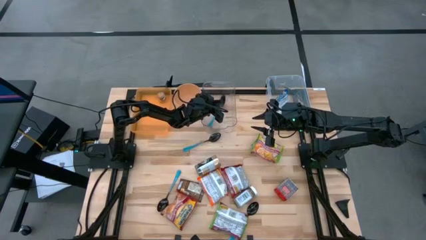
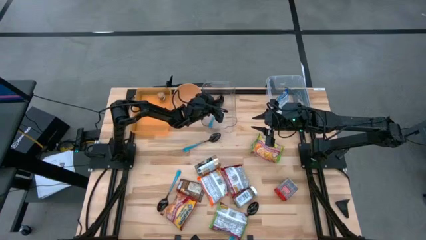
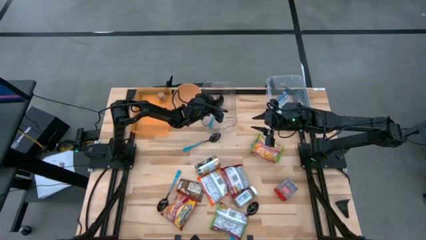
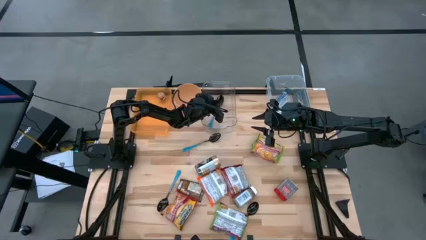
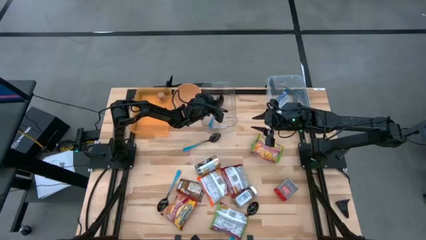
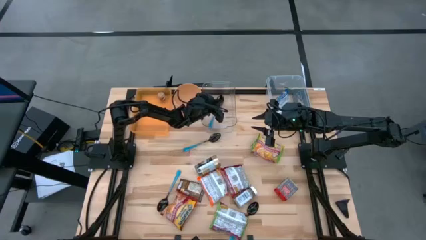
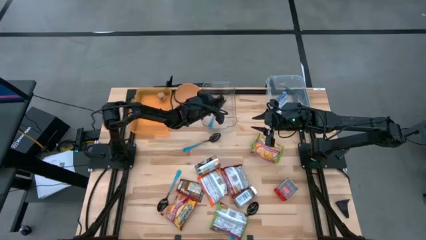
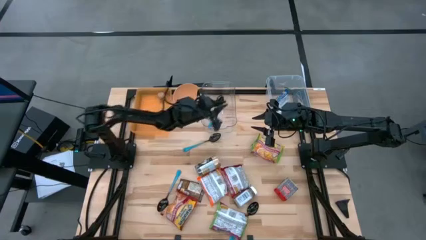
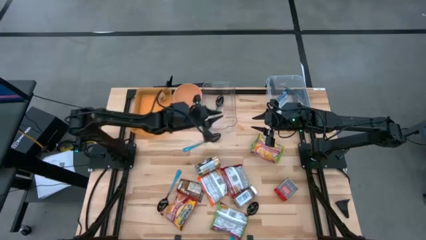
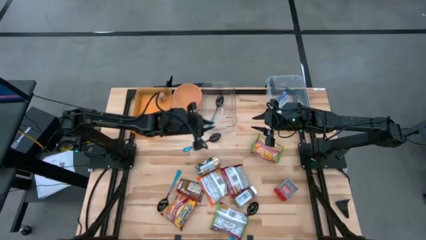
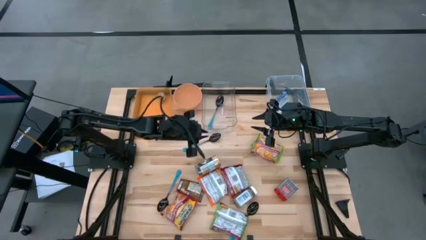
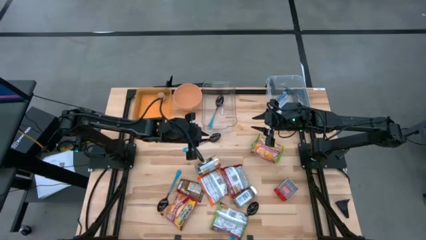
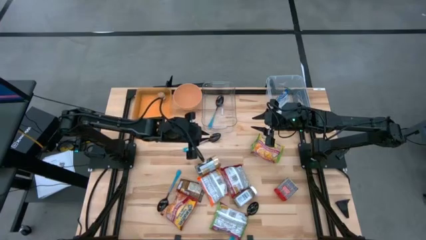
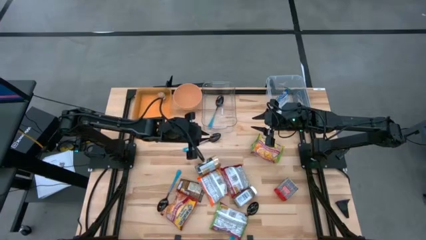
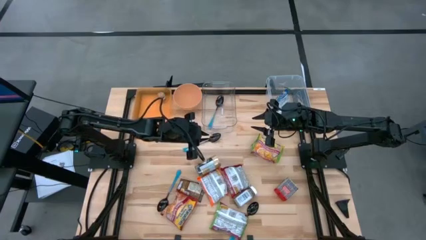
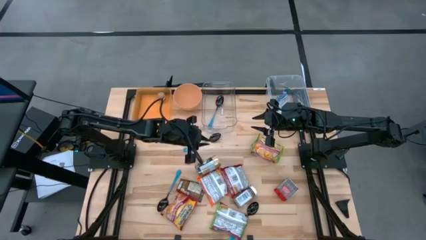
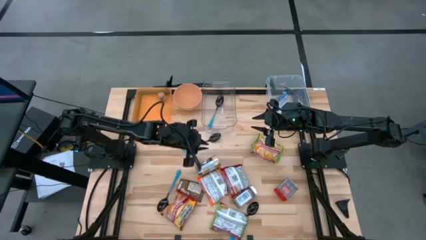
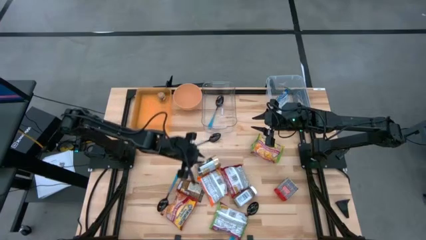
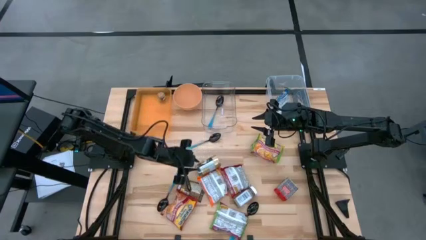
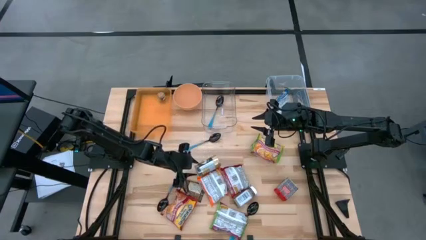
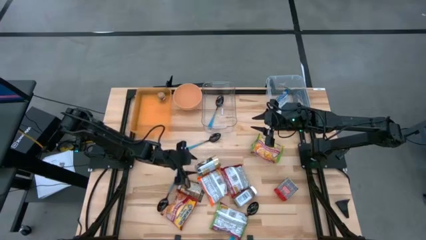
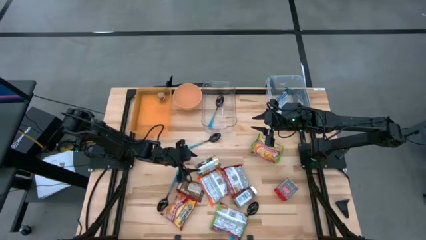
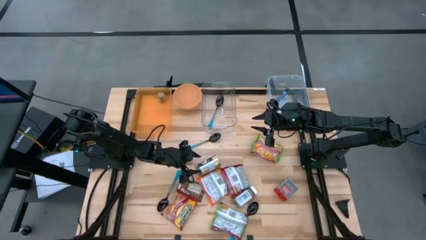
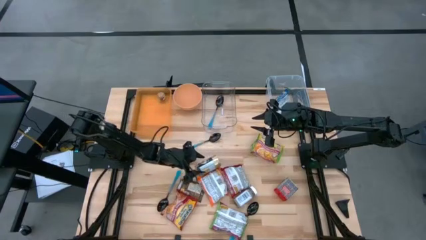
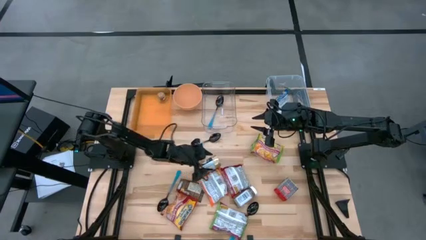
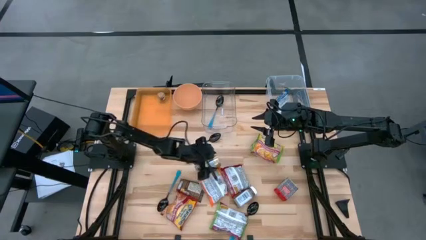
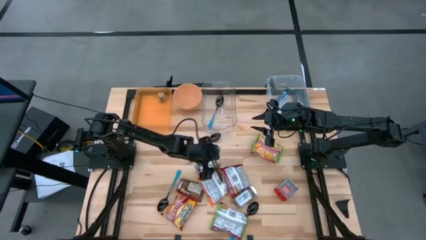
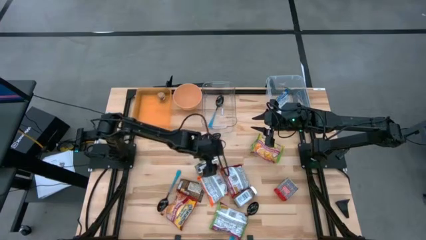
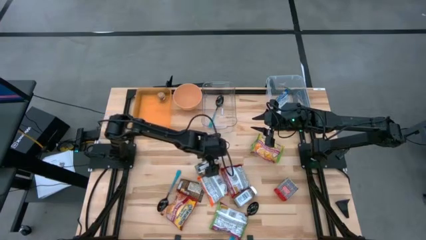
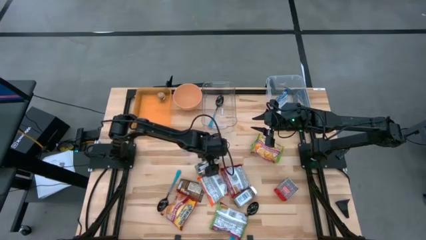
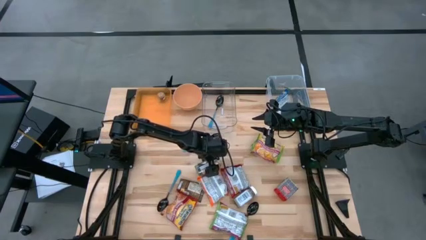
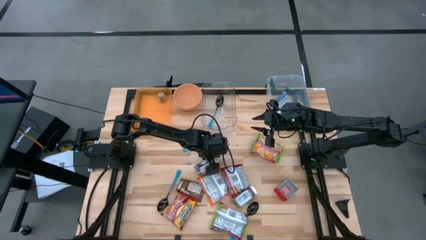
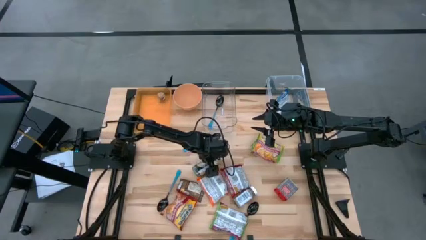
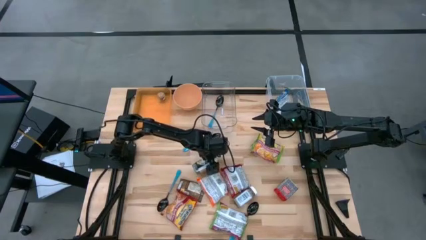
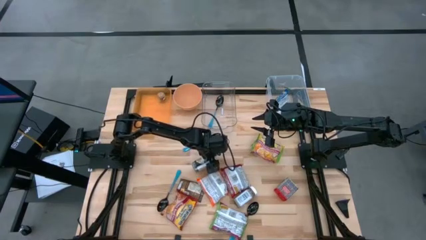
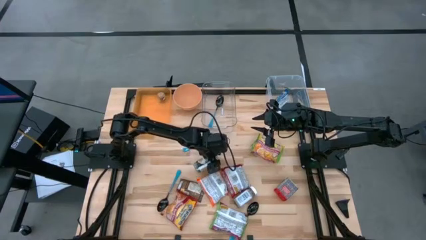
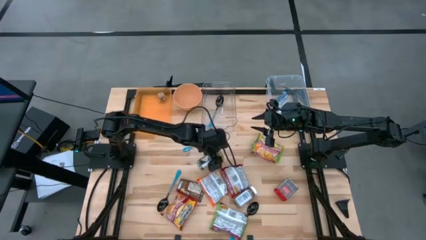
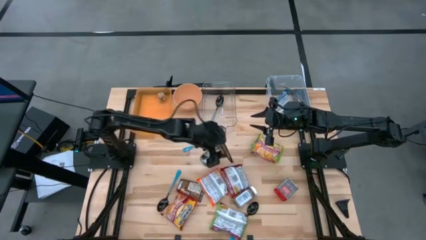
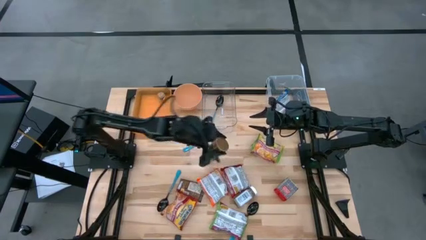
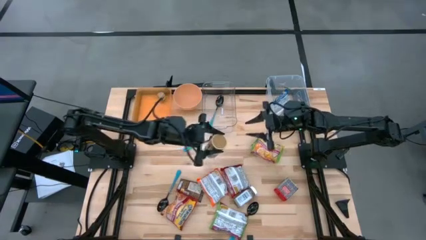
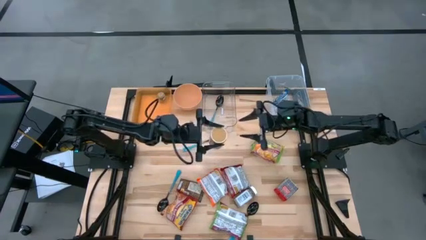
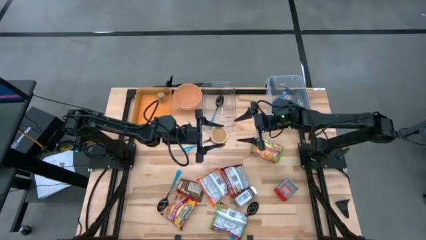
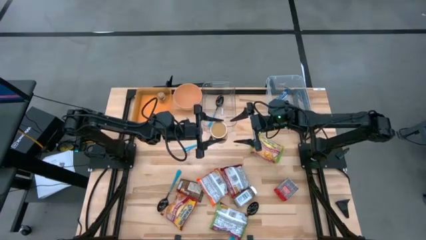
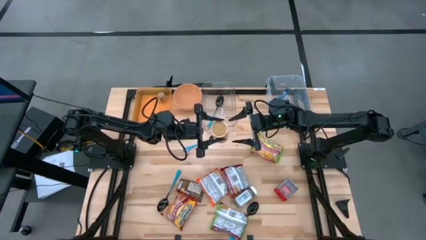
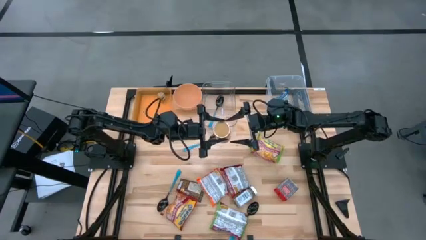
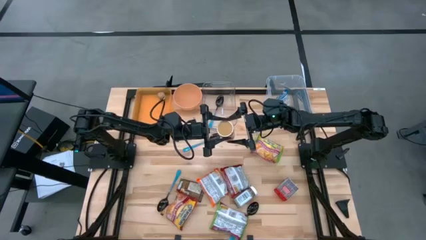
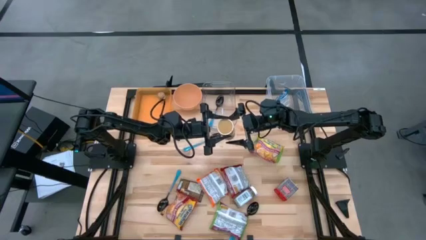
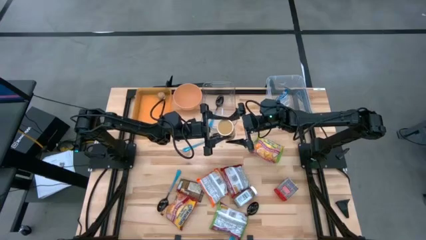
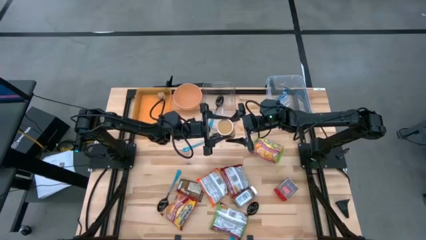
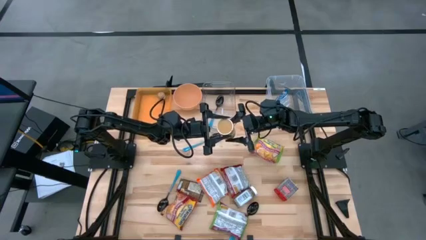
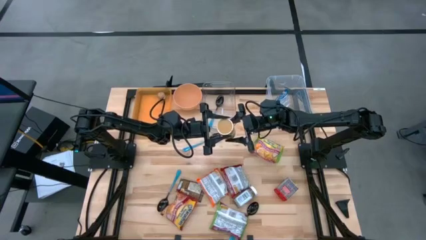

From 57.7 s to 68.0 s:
Task: Pick & Place Food Item
Put the gold seasoning bottle into the orange bin
